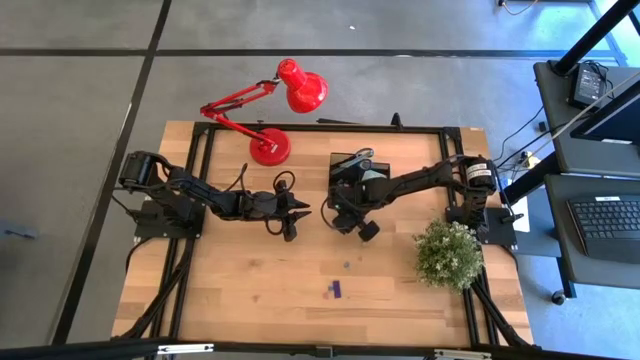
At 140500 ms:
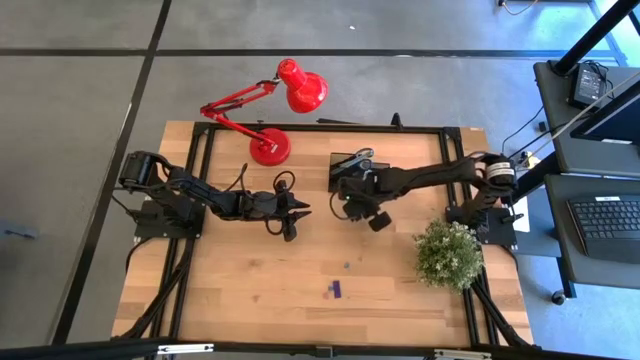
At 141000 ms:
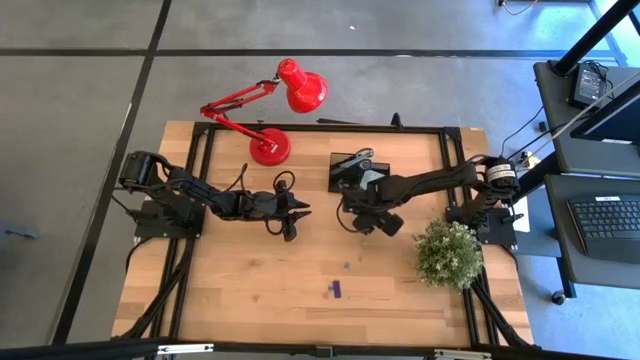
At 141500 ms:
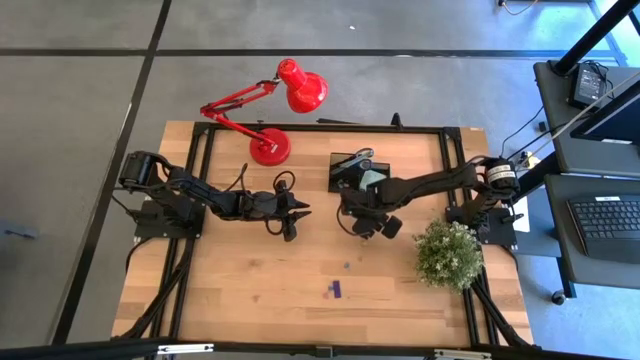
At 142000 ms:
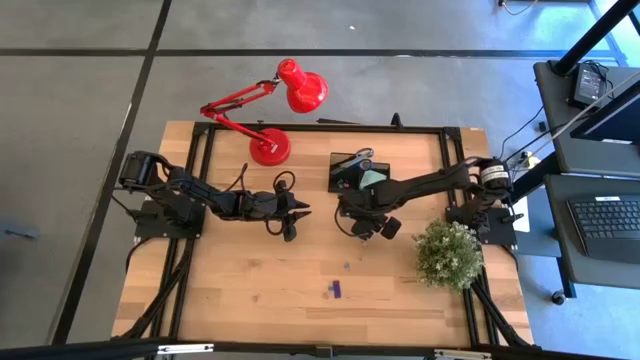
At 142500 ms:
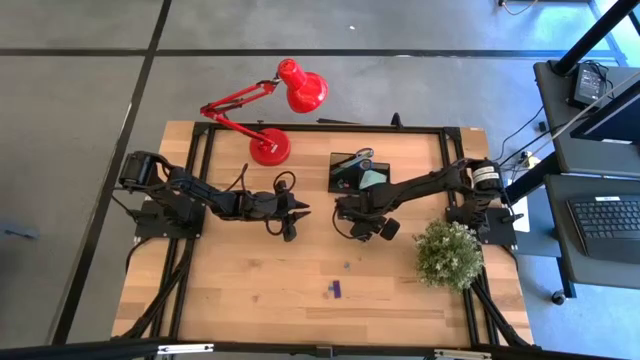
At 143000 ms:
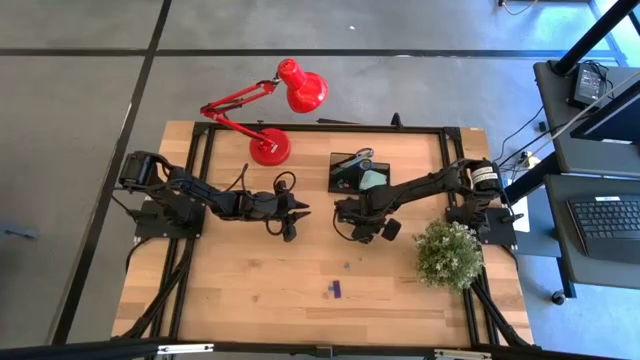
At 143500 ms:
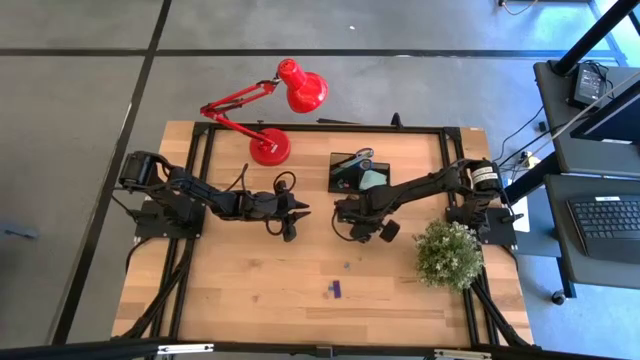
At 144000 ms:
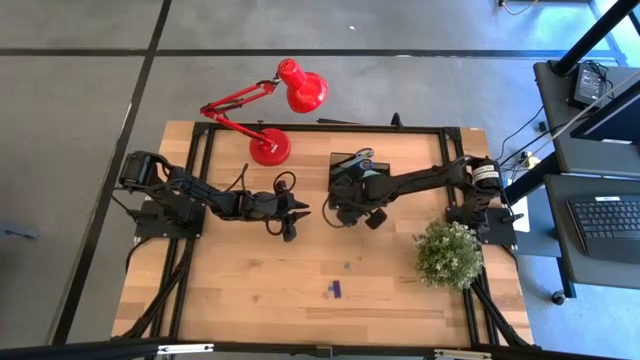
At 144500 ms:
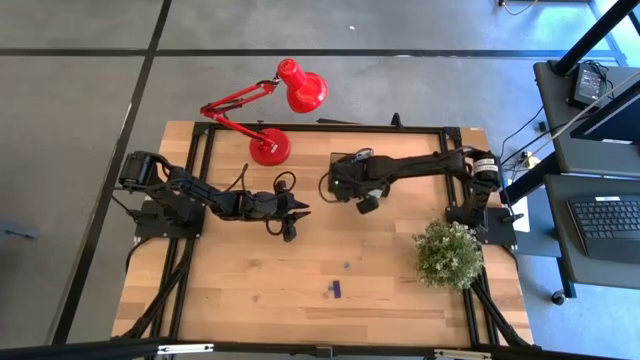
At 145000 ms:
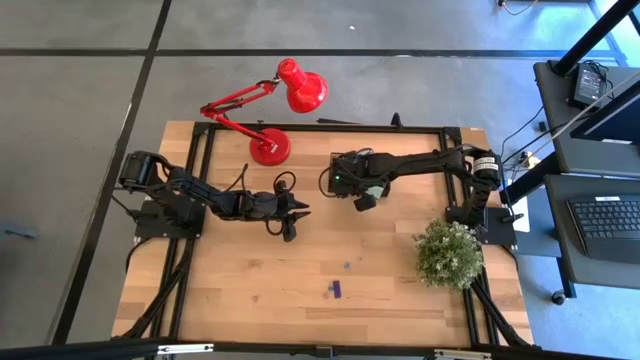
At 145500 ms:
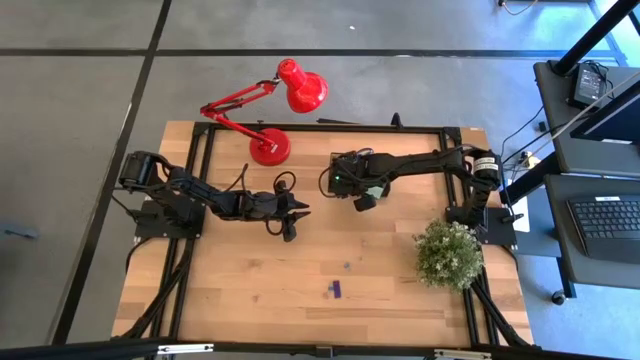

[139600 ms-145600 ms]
Task: Pick and place office supplies into organizer
Put the top pink binder clip into the black desk organizer

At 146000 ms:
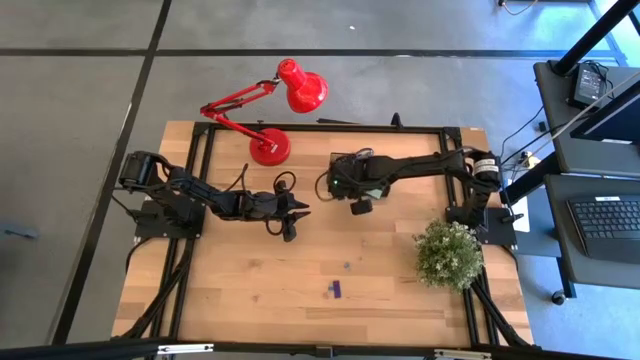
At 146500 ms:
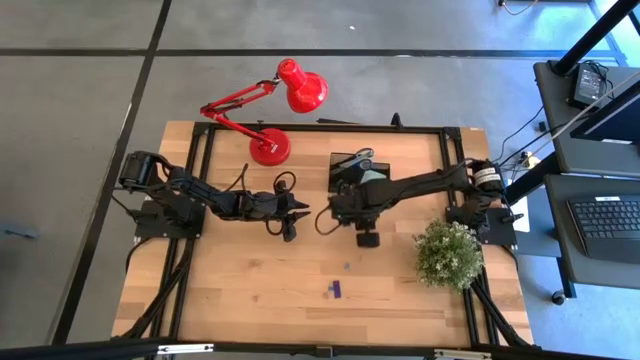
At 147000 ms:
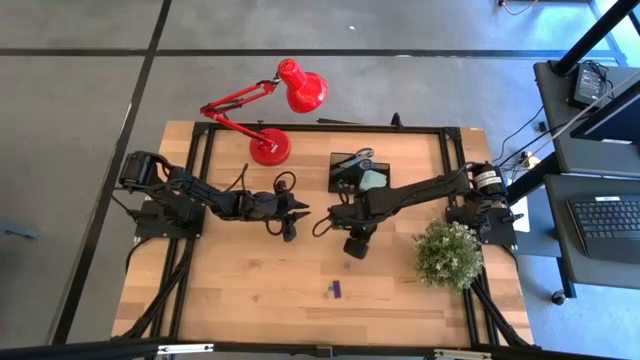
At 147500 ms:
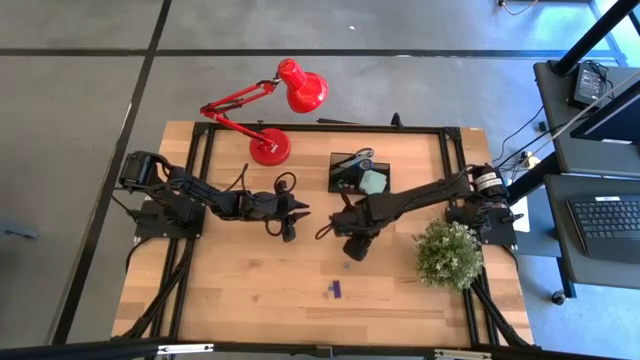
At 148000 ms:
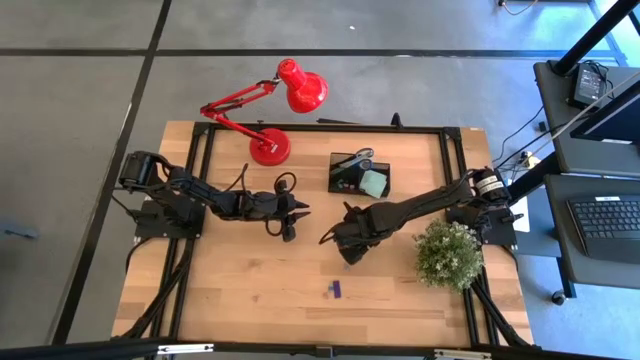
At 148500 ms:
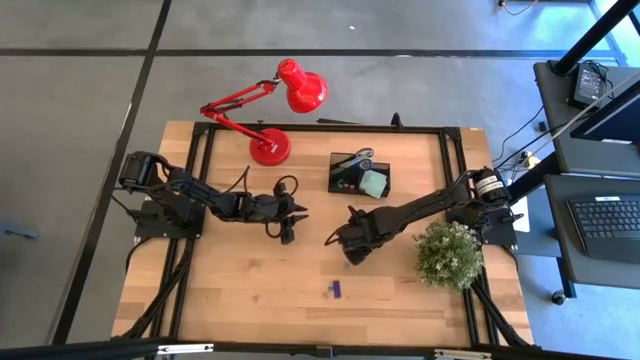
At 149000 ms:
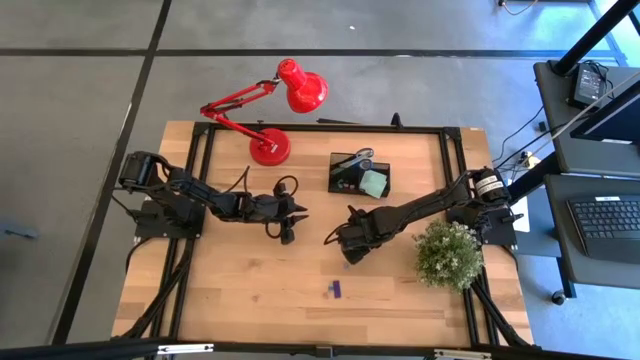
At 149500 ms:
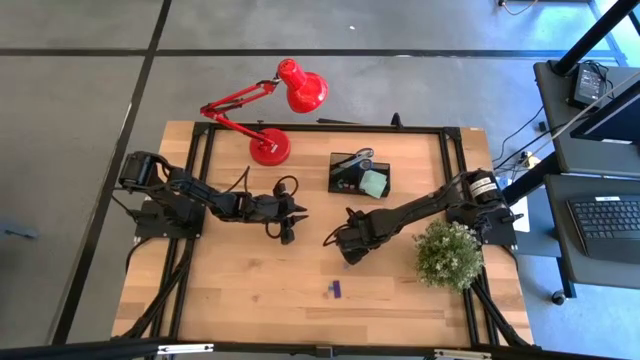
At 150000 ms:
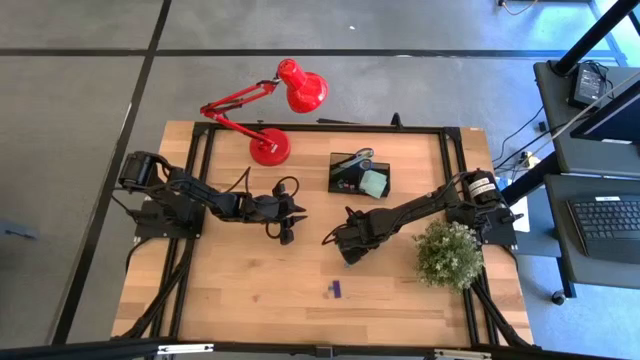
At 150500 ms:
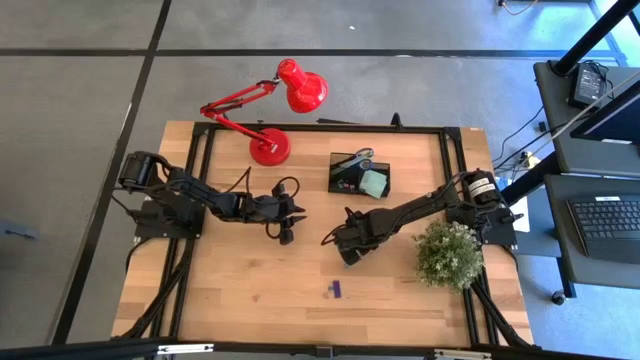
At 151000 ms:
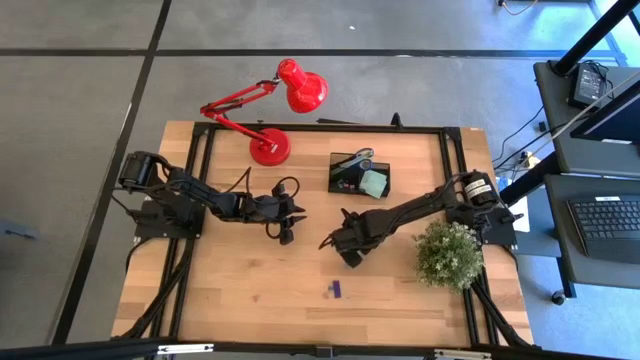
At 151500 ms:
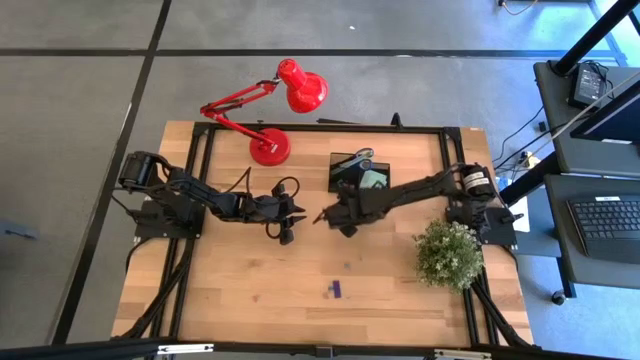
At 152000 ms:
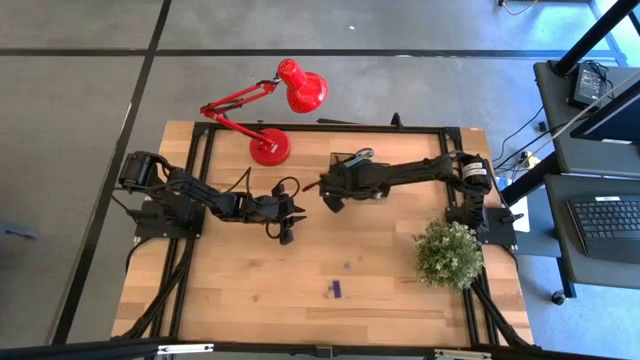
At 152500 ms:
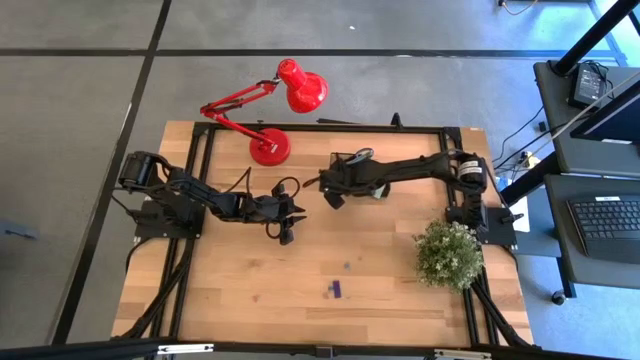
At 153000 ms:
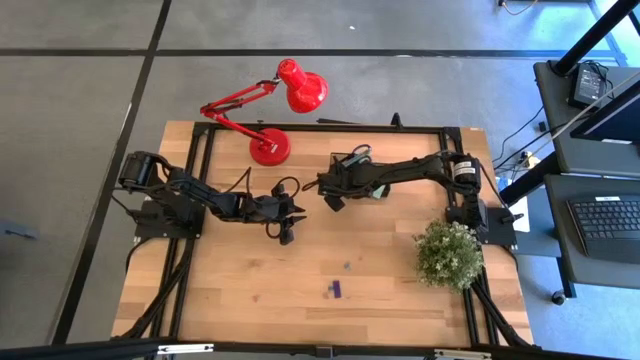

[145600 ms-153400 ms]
Put the light brown binder clip into the black desk organizer

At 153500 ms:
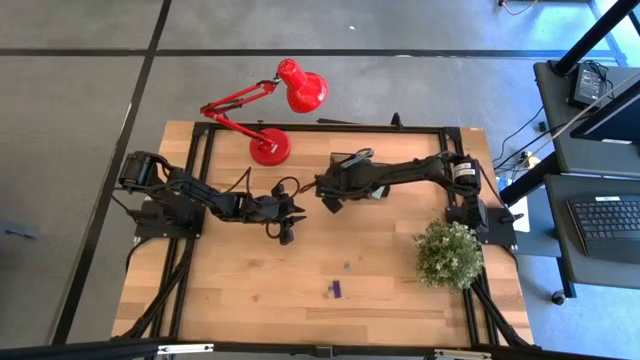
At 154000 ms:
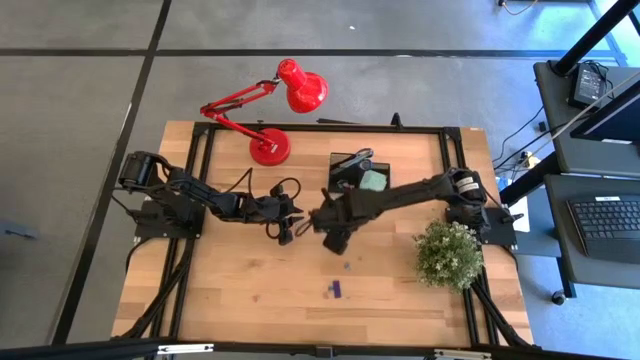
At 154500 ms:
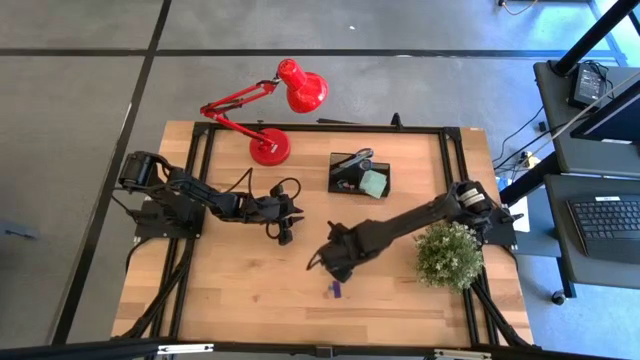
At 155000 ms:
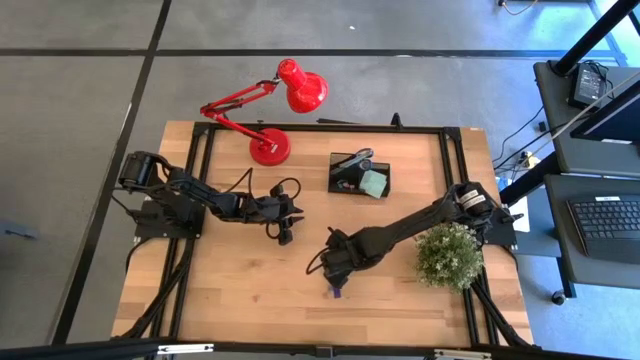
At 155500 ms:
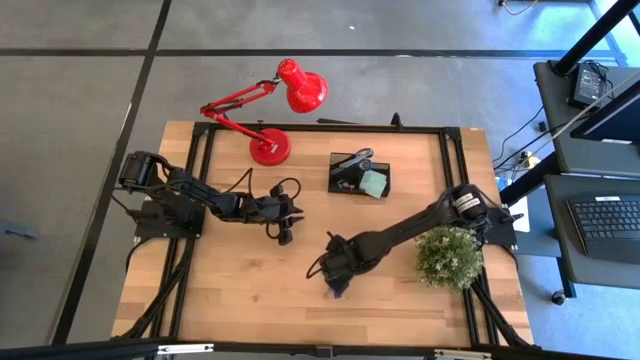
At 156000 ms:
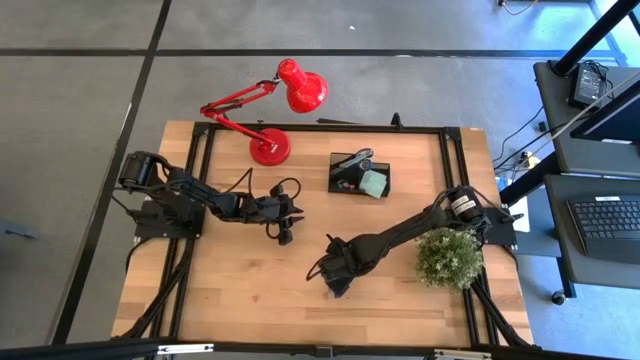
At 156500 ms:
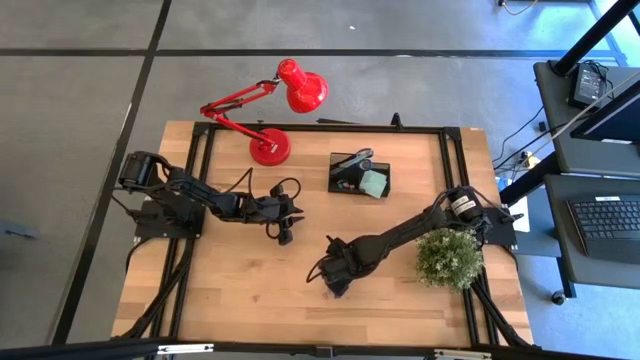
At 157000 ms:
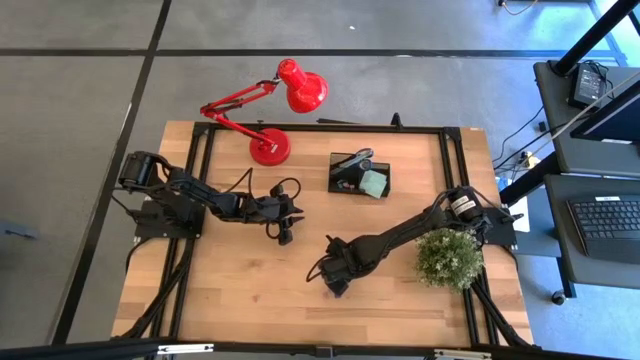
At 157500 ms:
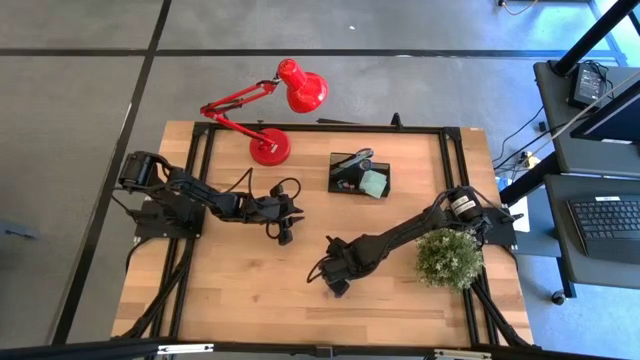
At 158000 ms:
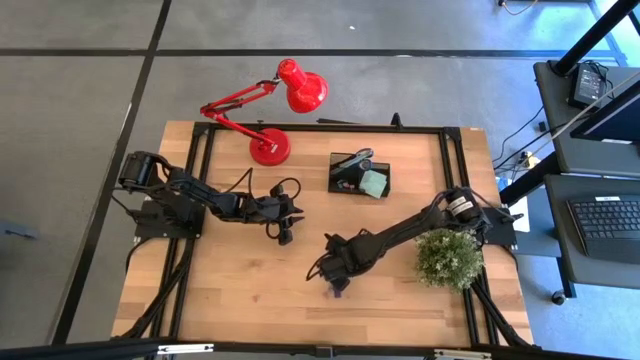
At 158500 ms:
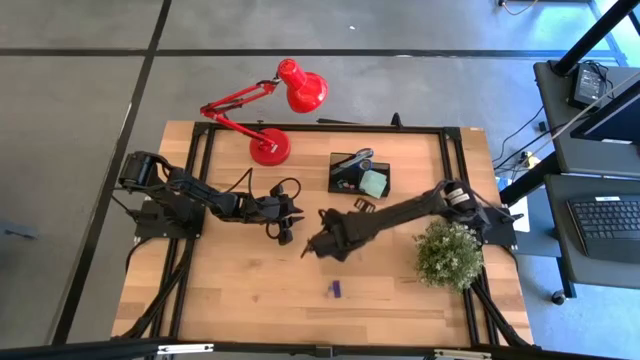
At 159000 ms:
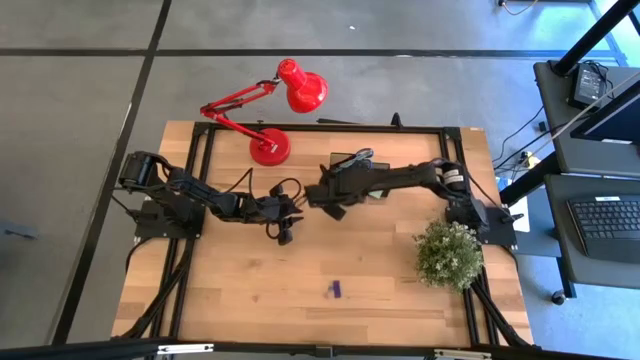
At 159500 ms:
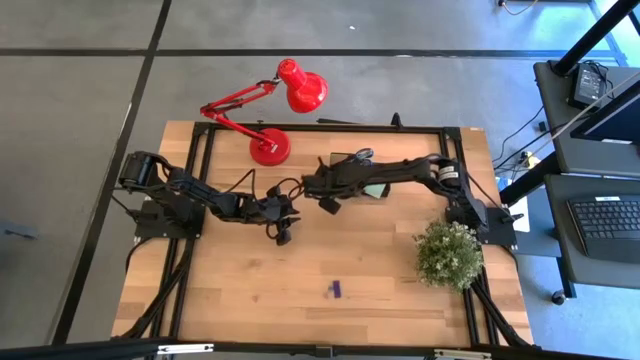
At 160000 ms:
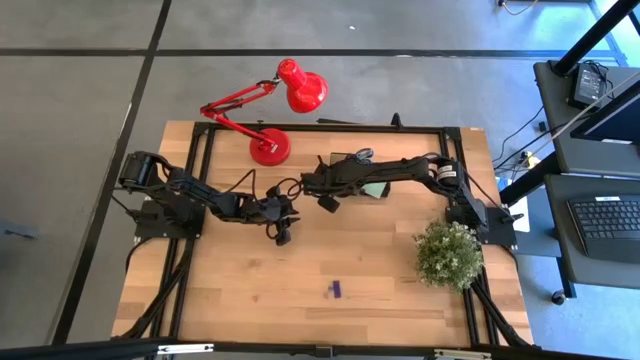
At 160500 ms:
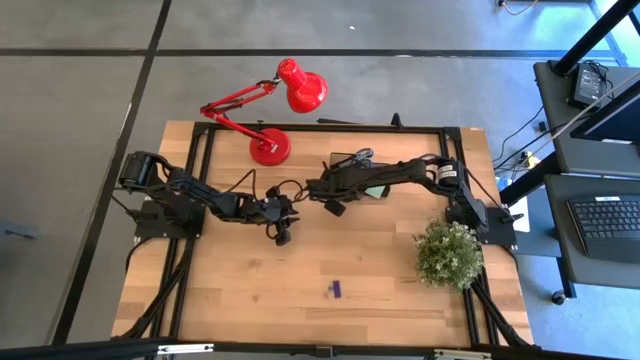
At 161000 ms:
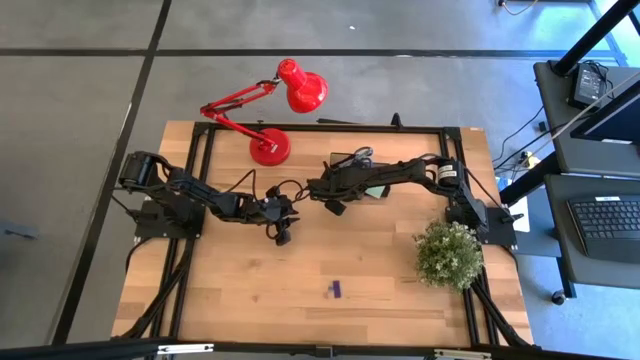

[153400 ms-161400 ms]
Put the top blue binder clip into the black desk organizer
